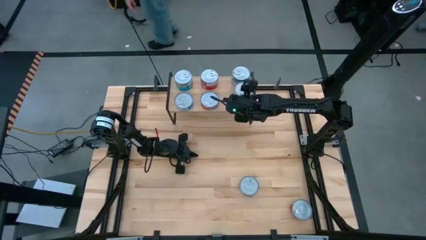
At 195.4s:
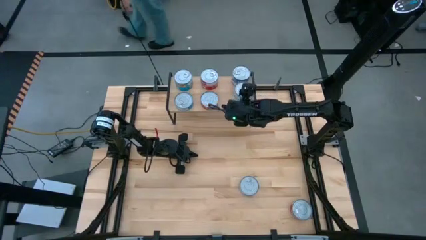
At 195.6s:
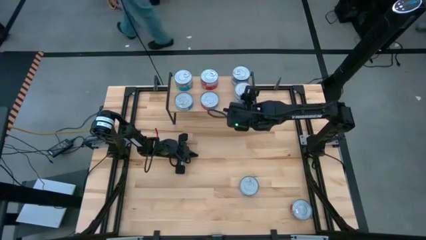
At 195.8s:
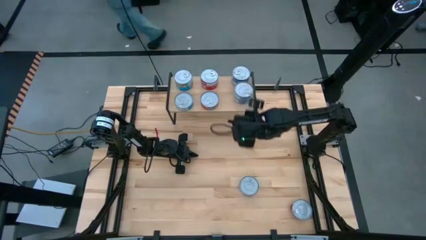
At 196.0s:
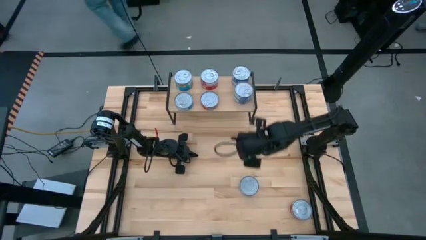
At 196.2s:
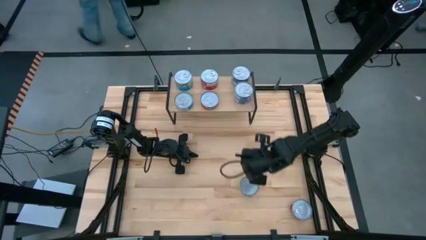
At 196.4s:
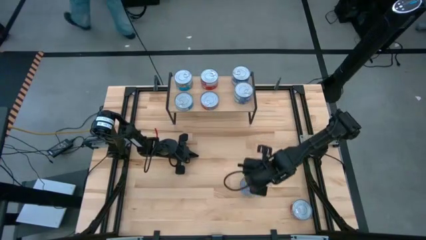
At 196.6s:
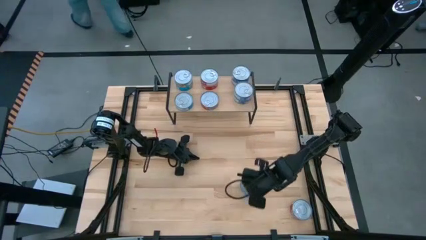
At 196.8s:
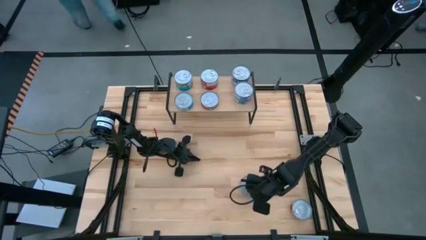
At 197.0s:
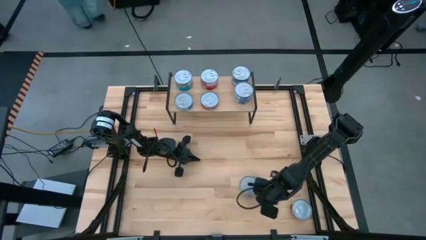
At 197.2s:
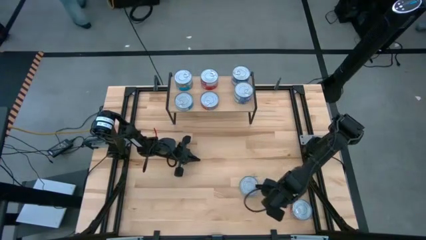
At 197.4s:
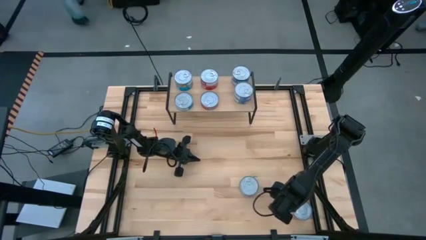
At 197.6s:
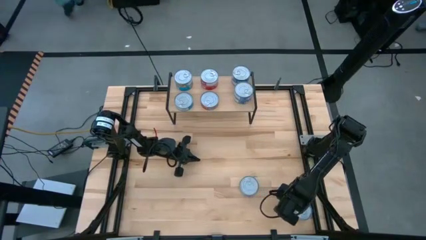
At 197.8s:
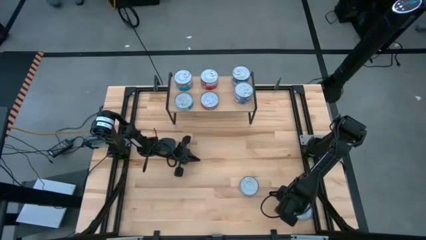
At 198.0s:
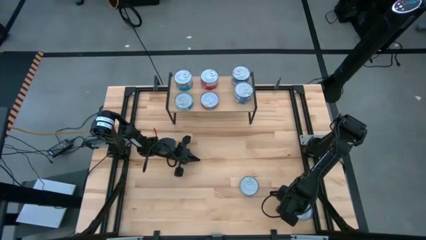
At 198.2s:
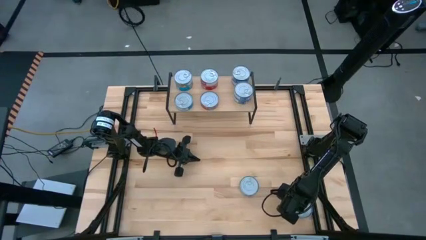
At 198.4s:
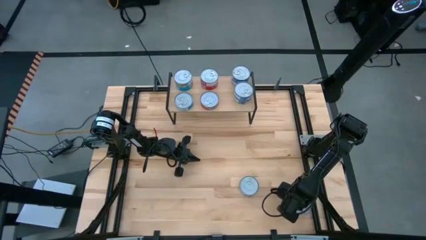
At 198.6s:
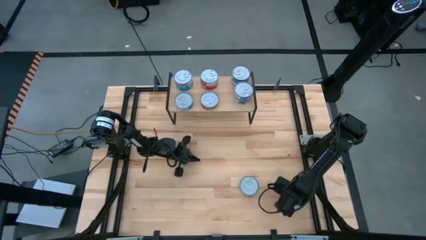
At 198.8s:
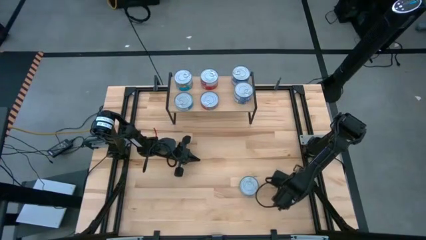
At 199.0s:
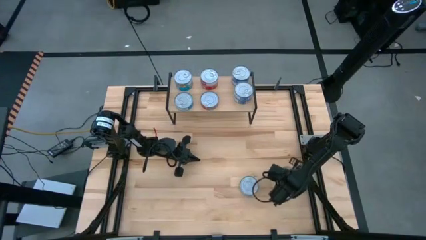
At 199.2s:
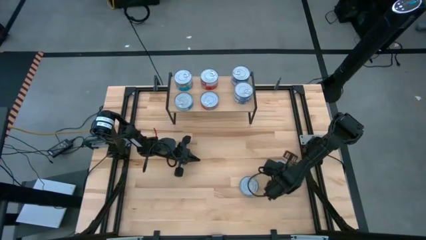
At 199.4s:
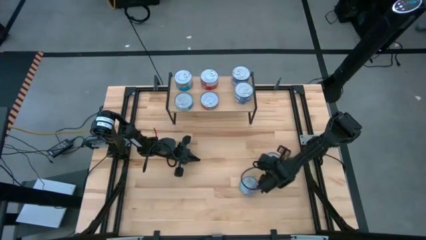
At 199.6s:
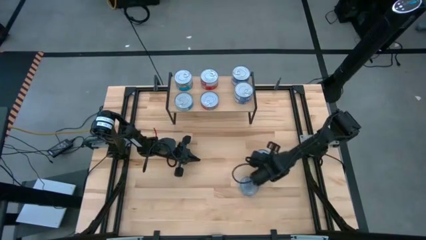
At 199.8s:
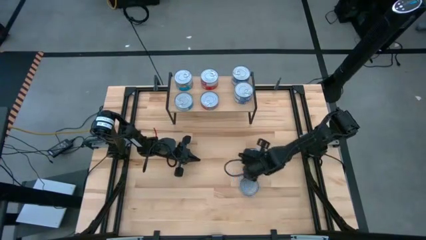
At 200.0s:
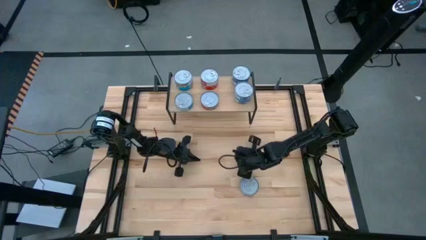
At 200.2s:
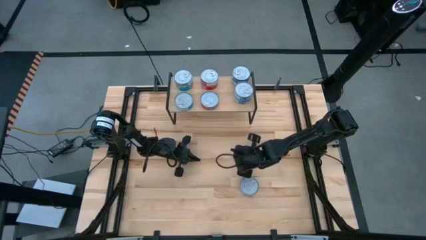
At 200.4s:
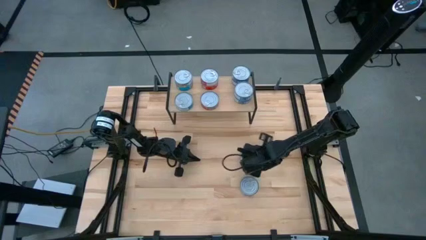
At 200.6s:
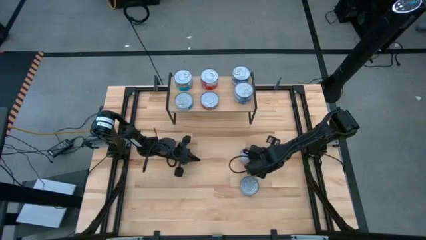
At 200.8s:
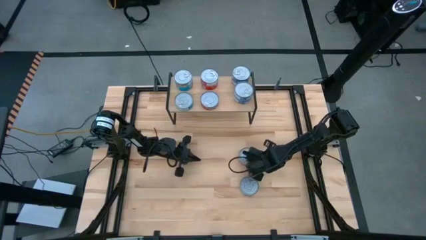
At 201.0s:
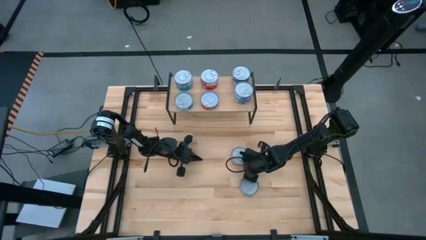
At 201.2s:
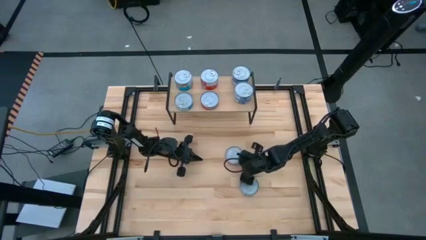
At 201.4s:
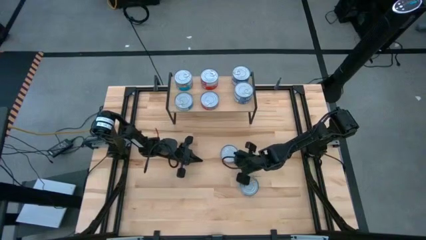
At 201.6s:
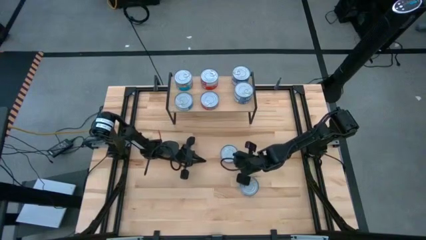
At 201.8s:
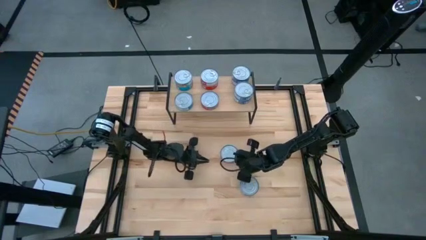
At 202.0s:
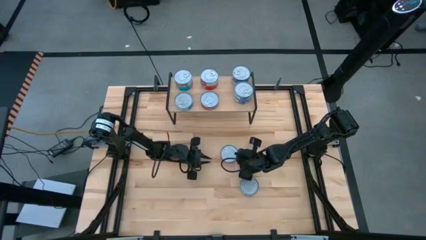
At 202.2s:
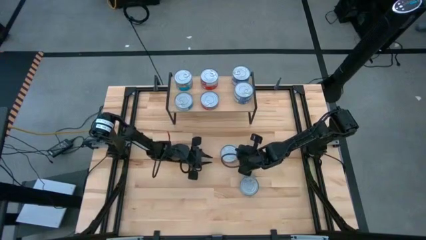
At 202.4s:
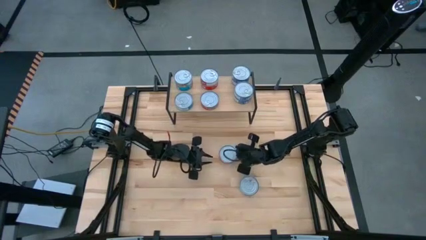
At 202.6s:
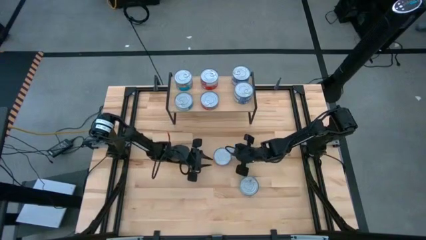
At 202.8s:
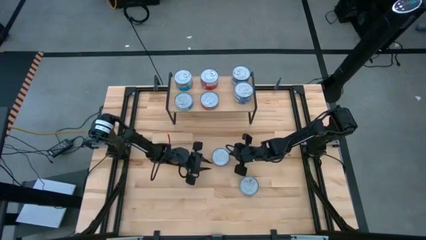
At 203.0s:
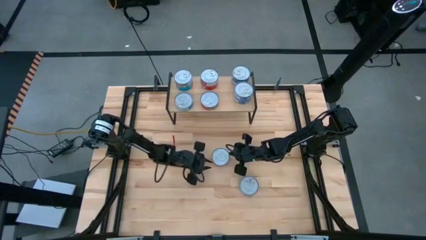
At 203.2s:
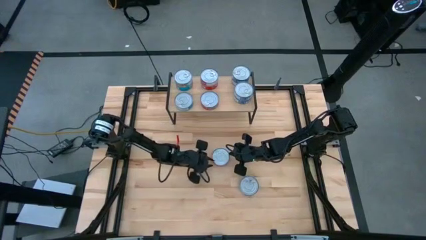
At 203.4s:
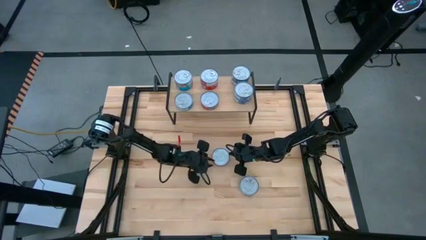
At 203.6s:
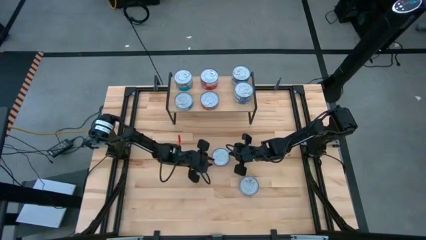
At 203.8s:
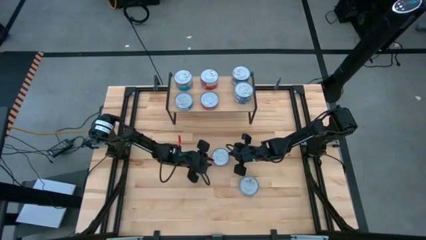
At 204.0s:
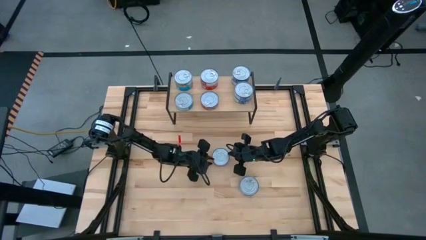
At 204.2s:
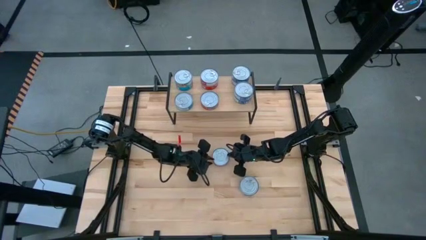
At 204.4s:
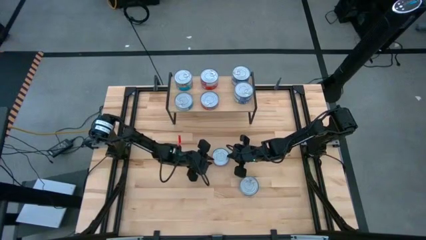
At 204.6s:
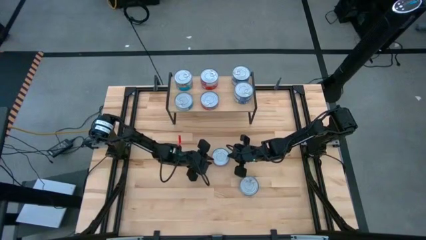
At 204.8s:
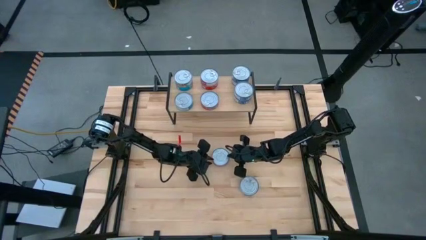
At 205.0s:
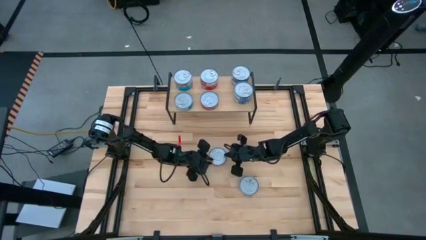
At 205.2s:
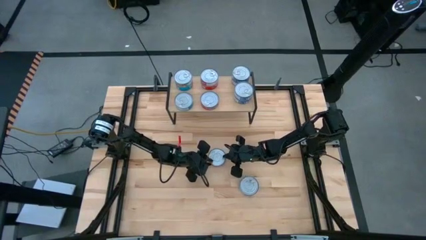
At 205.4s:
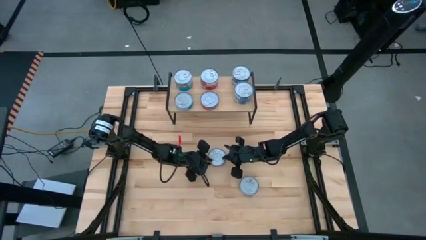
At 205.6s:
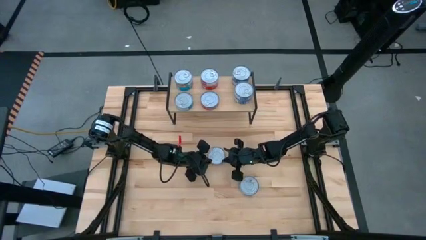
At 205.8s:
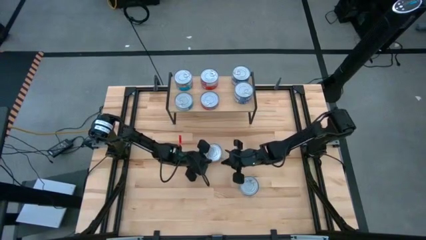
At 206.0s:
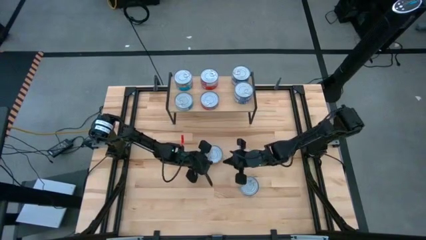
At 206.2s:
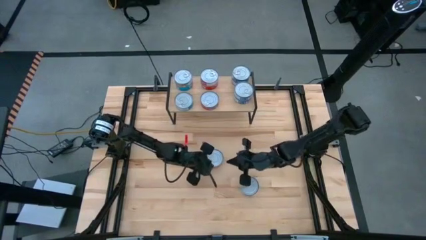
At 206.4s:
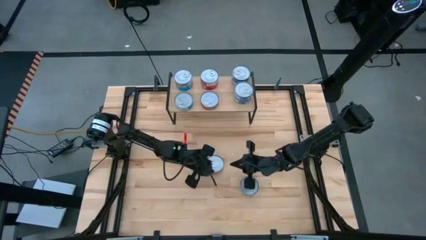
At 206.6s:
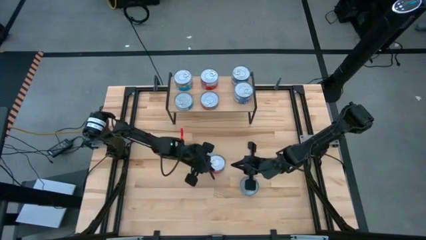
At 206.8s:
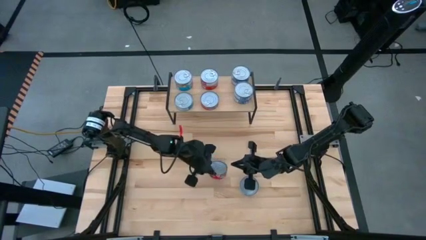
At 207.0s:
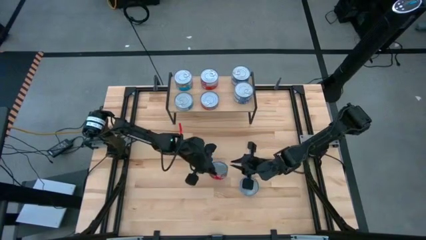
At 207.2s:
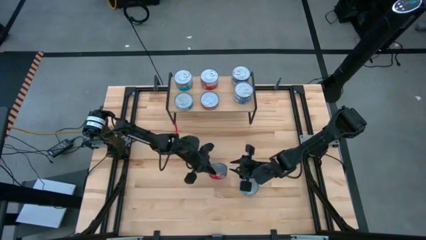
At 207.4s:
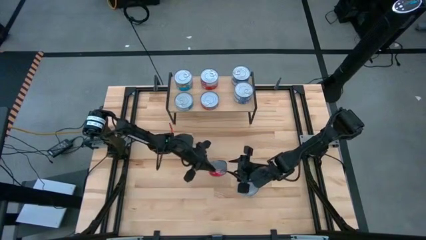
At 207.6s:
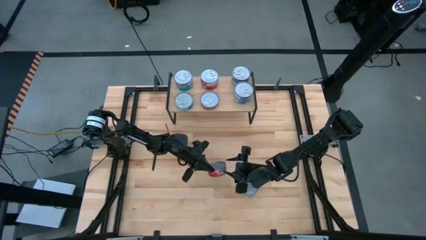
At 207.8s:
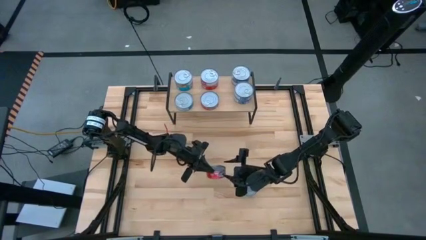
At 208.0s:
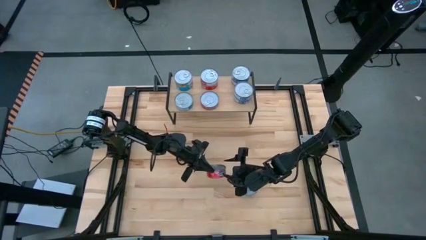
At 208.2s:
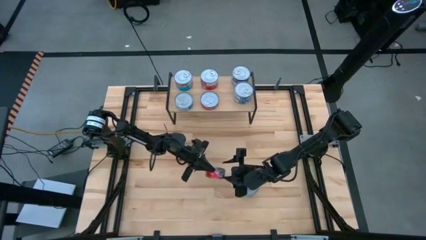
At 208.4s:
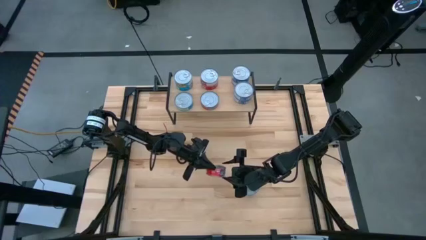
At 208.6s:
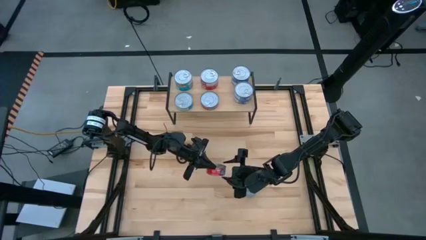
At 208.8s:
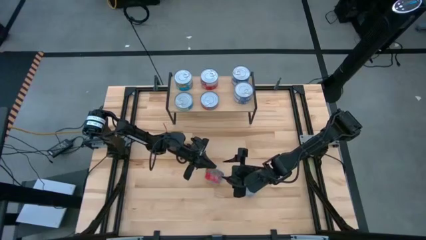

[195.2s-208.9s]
Task: Stack canned seafood by type on shelf
Stack the red tuna can on top of the other red tuna can on the shelf

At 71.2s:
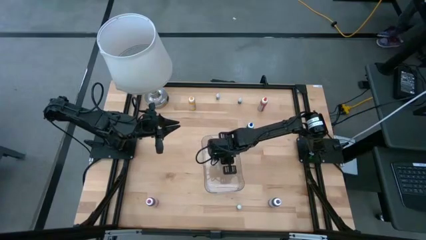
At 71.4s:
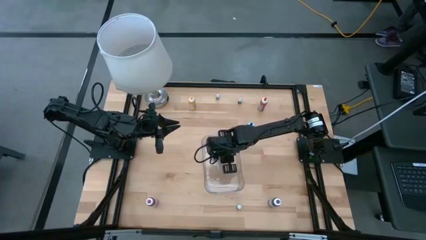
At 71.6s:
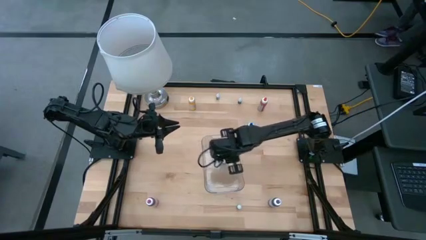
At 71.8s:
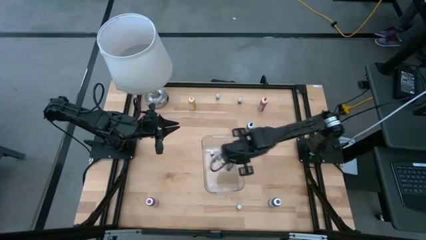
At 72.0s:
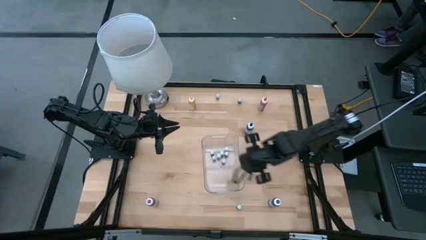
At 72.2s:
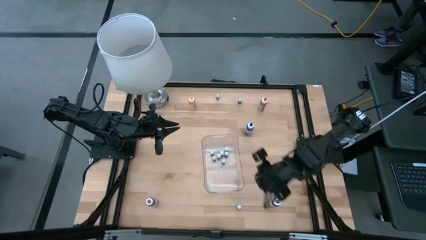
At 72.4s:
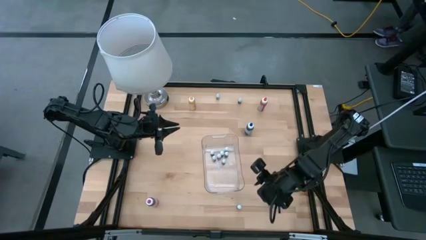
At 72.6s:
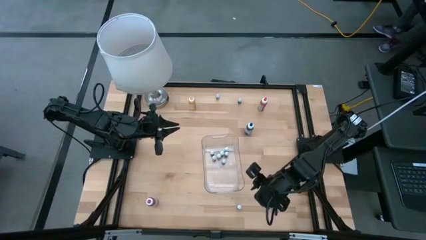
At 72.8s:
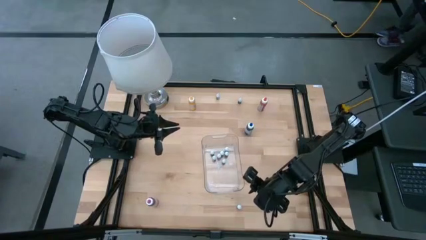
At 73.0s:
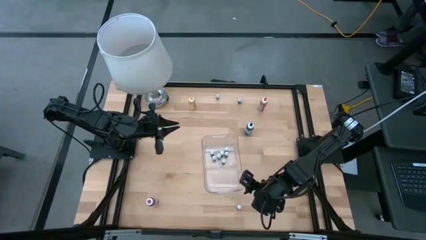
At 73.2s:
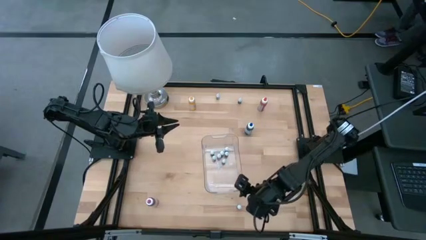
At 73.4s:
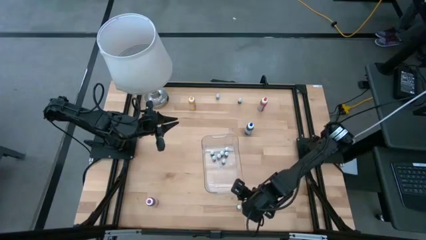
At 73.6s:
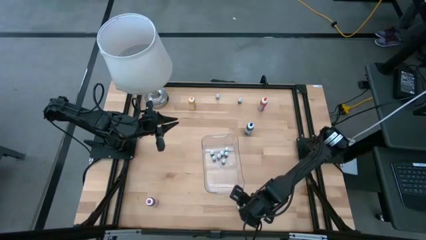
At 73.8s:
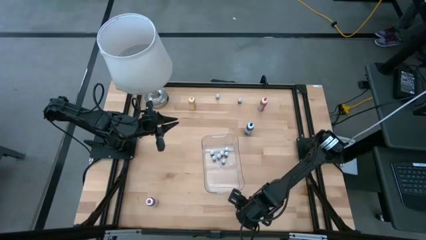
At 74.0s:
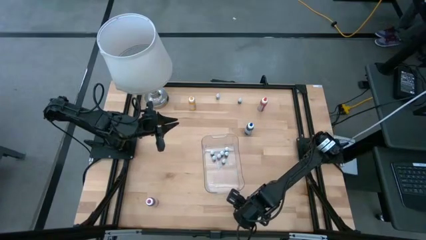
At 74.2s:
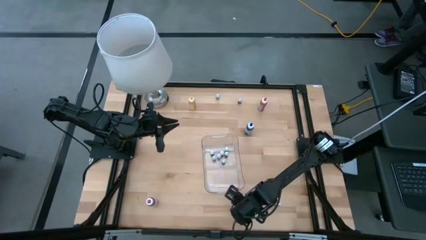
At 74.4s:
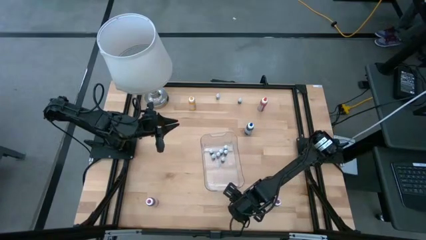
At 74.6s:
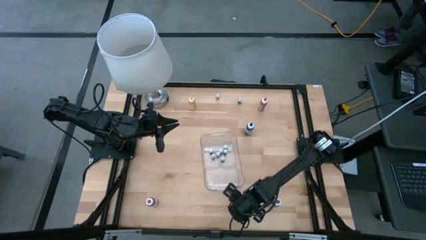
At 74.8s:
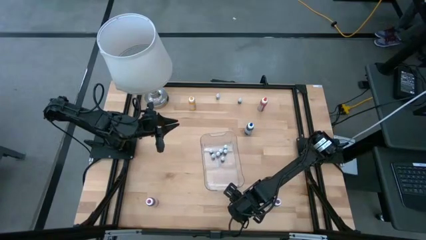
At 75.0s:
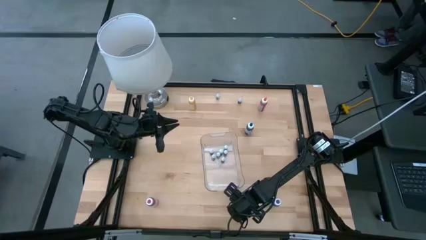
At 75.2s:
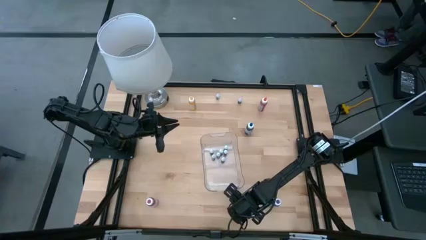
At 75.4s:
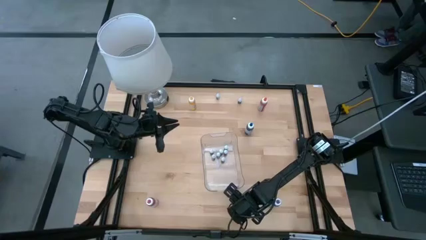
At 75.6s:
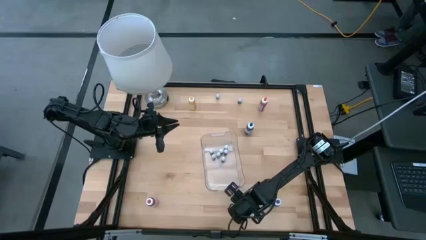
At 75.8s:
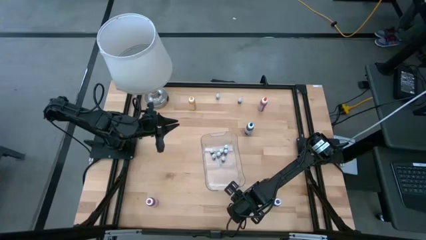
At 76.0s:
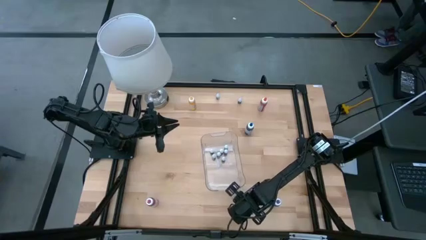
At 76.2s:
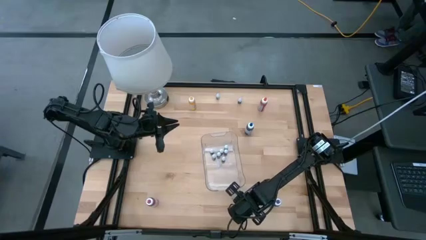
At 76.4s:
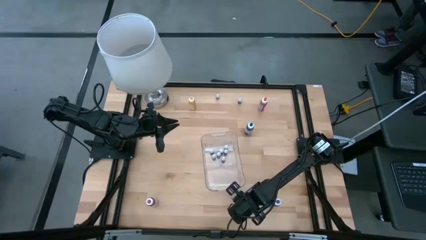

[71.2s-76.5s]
Task: Pick & Place food coloring
Put the small brown food coloring bottle into the transparent container
